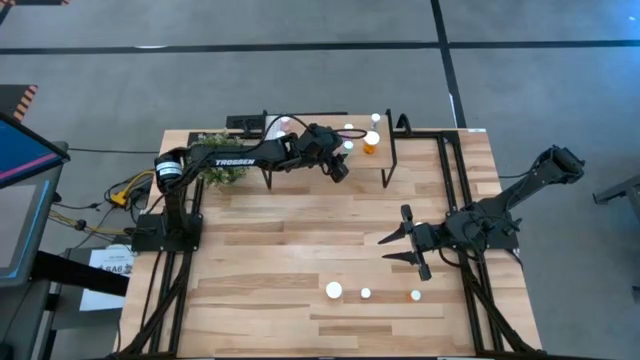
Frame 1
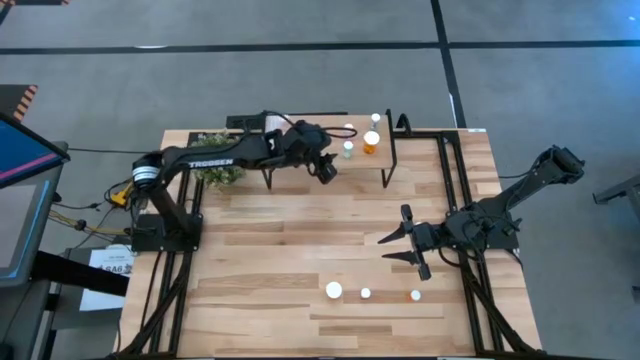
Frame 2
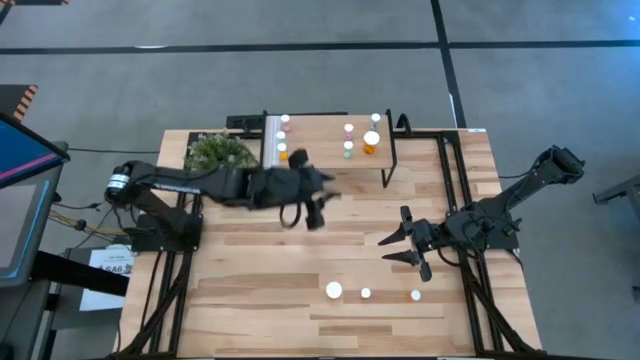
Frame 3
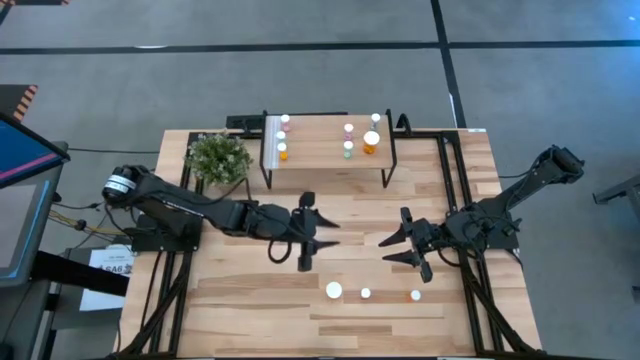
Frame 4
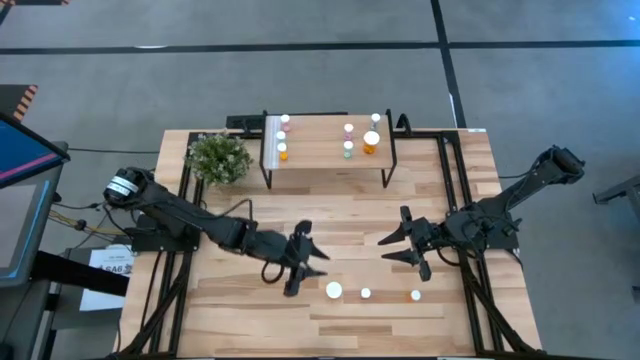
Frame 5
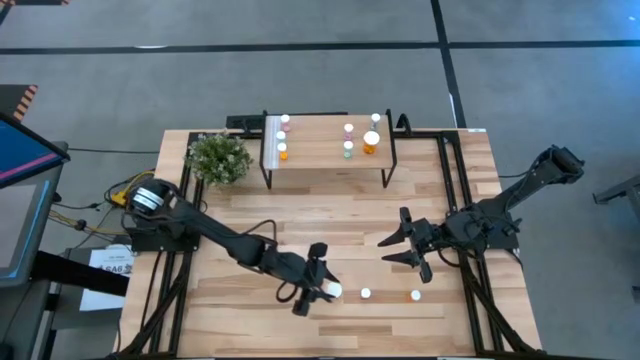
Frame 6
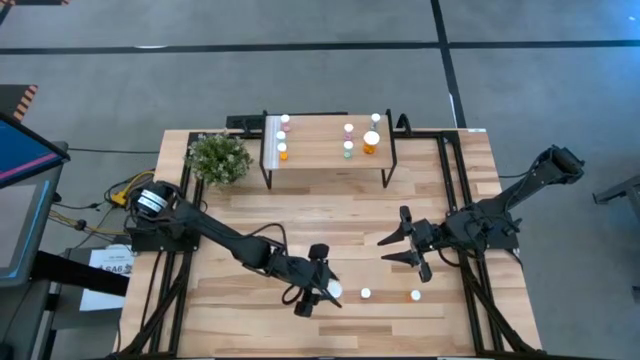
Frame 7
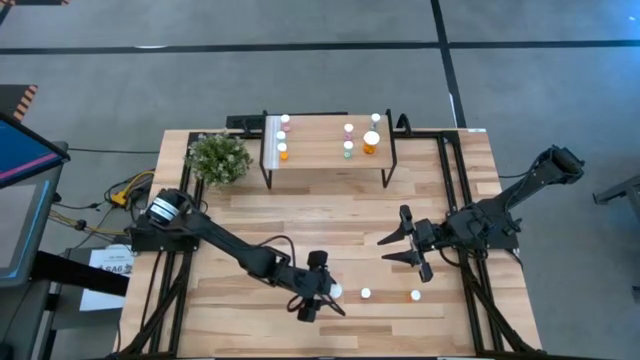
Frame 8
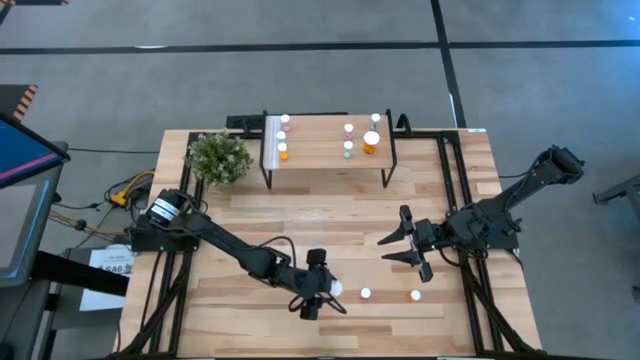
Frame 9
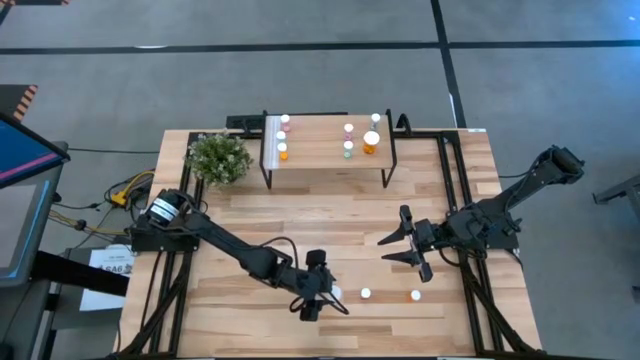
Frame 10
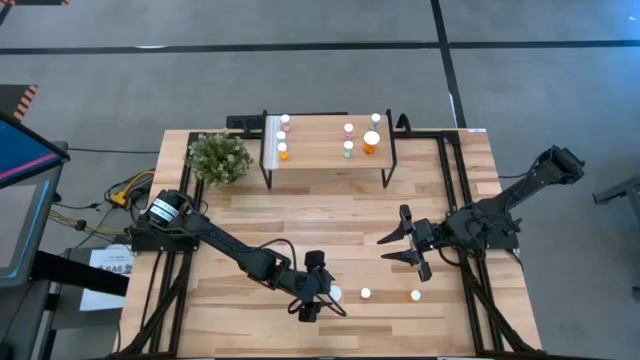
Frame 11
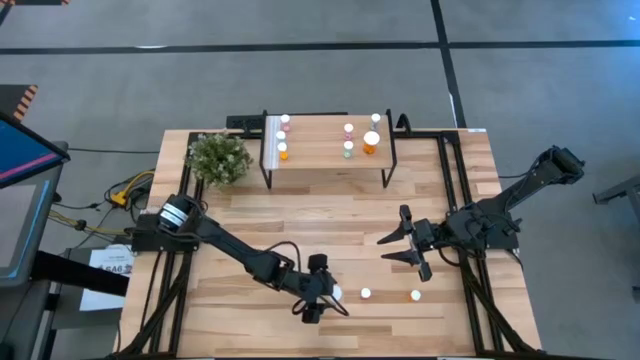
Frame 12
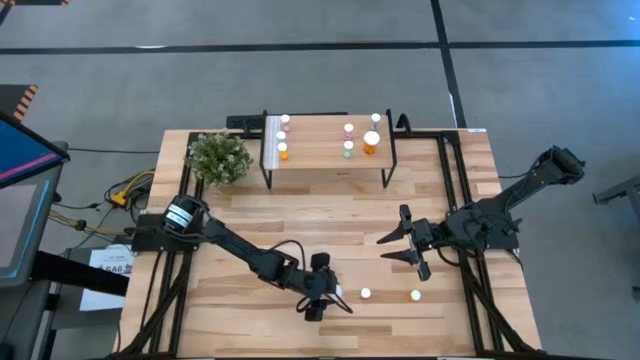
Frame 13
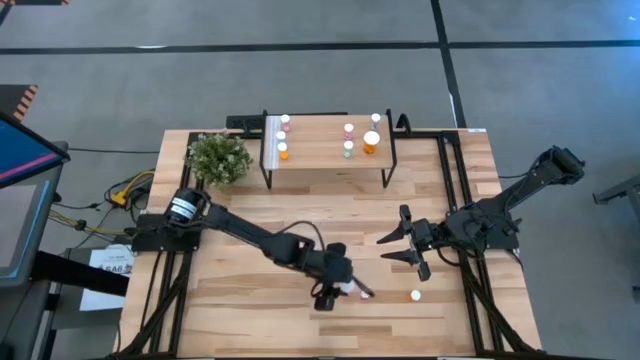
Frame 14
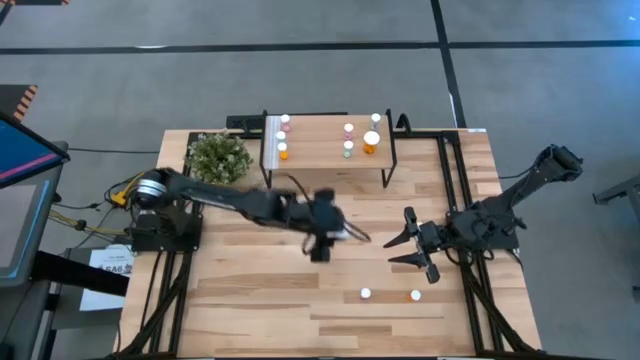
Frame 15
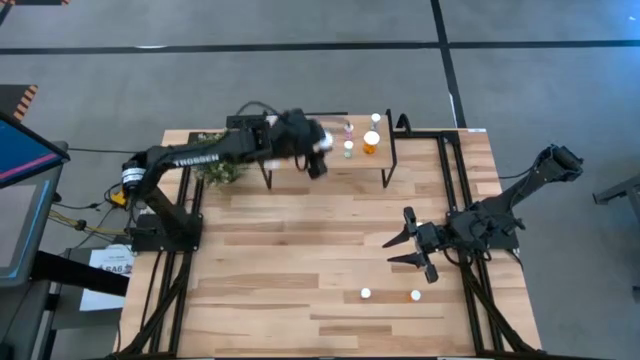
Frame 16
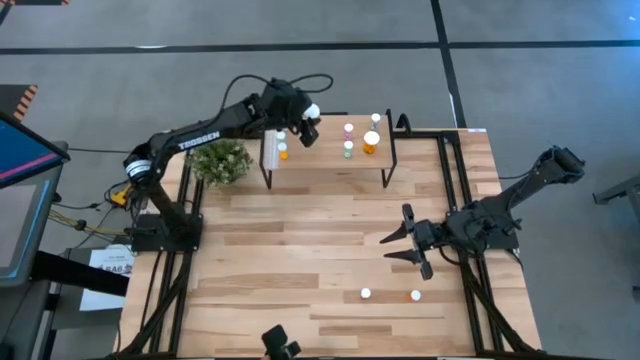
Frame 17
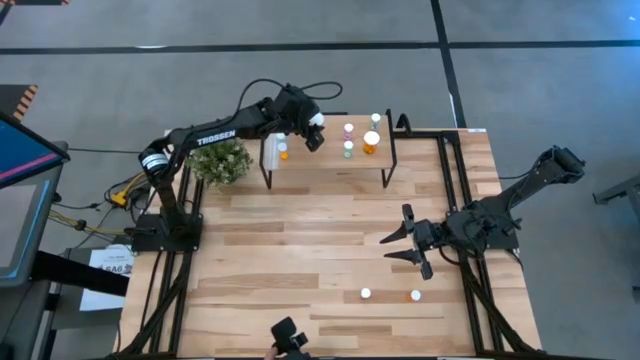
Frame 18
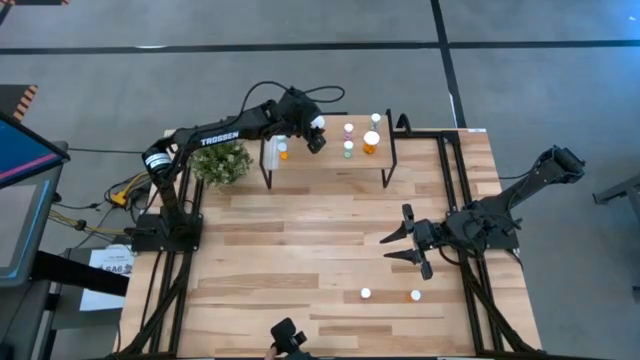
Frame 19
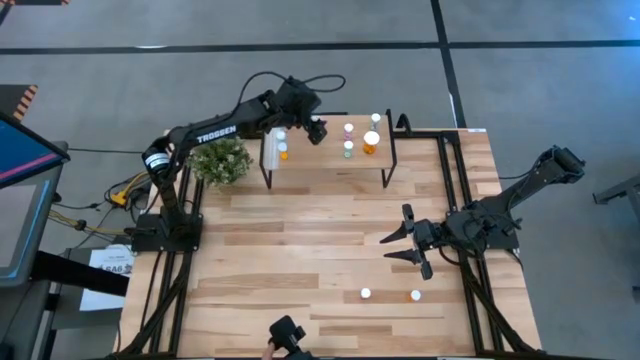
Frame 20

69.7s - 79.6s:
Task: Pick and place medicine bottles onto shelf by color
Put the big orange pill bottle on the shelf

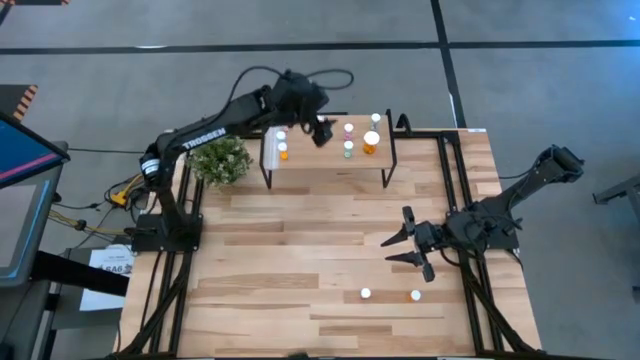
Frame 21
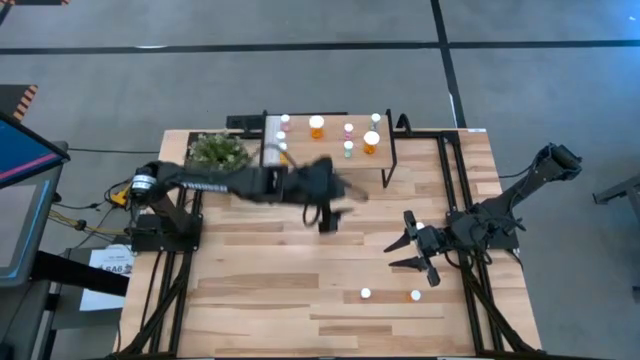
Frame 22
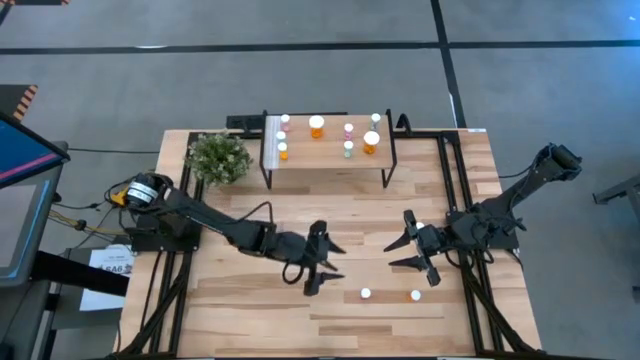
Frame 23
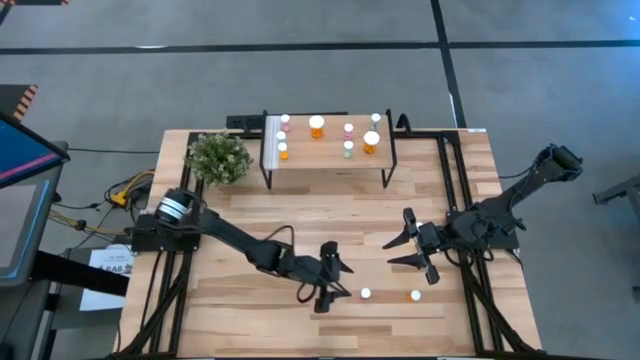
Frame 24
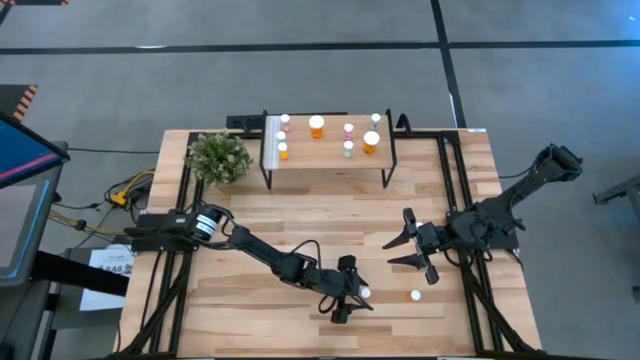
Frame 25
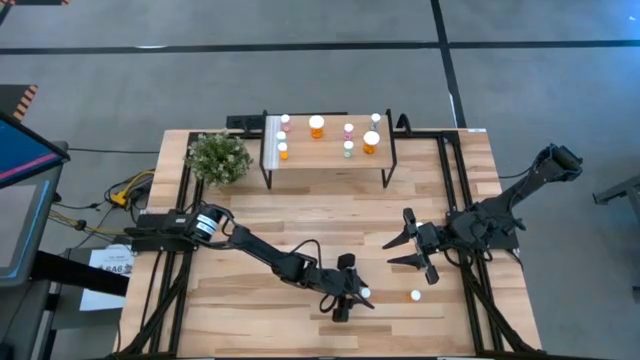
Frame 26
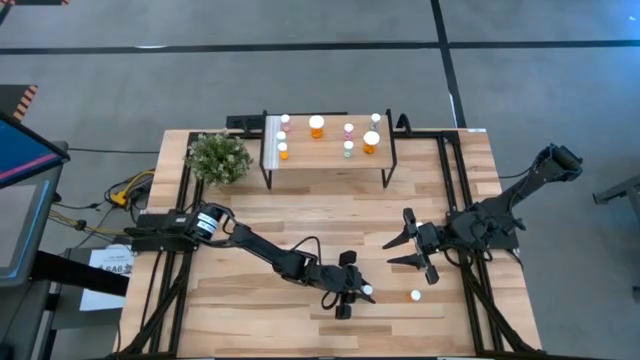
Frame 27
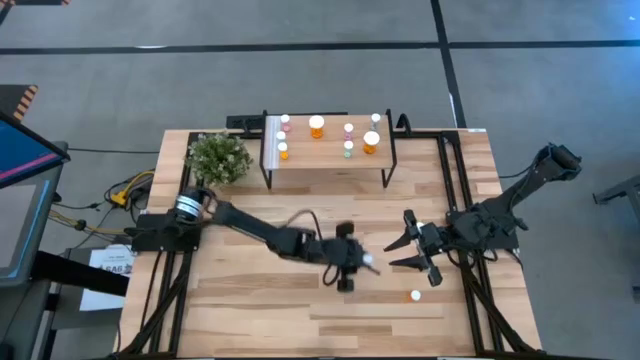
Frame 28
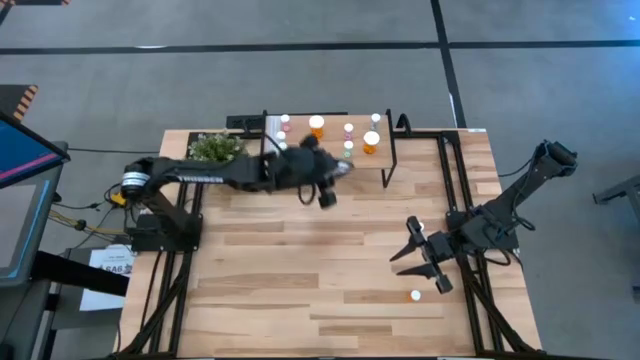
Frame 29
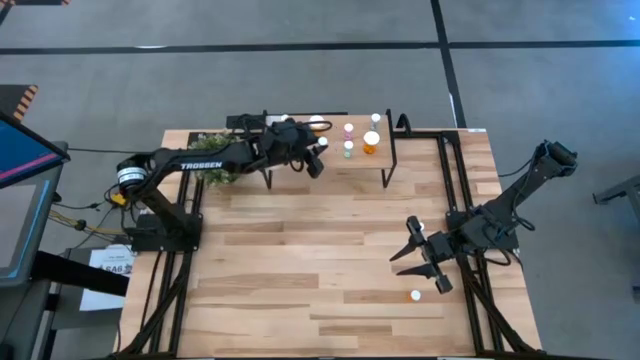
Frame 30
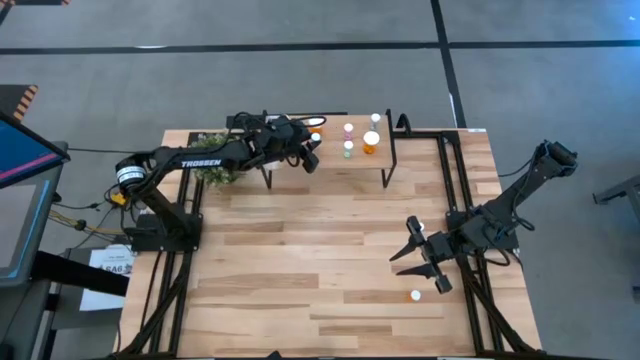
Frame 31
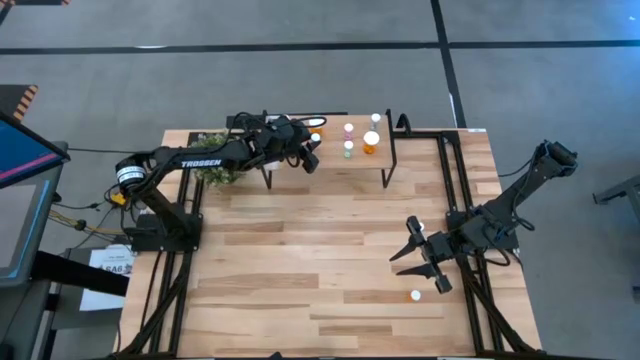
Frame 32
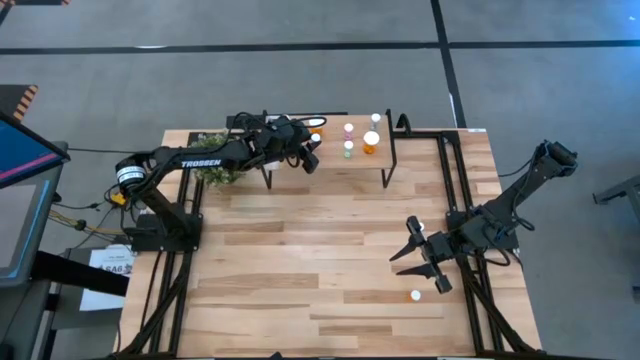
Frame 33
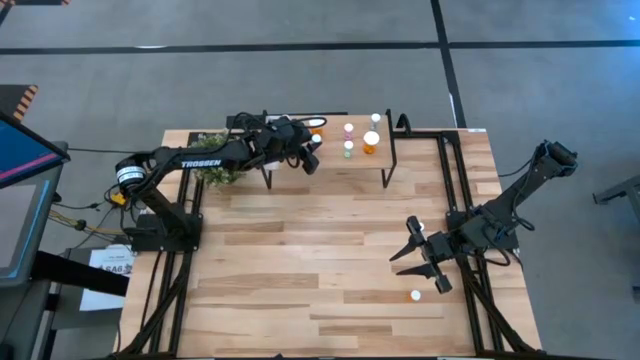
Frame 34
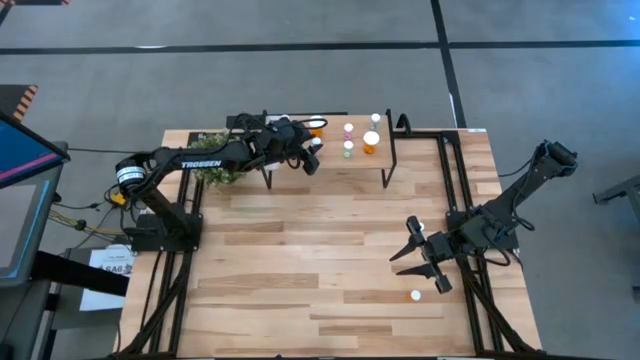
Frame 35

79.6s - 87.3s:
Put the pink pill bottle on the shelf

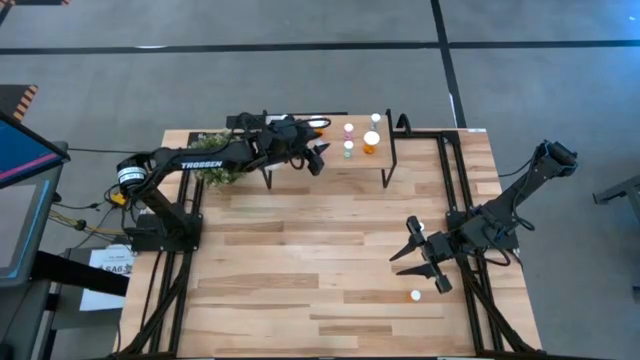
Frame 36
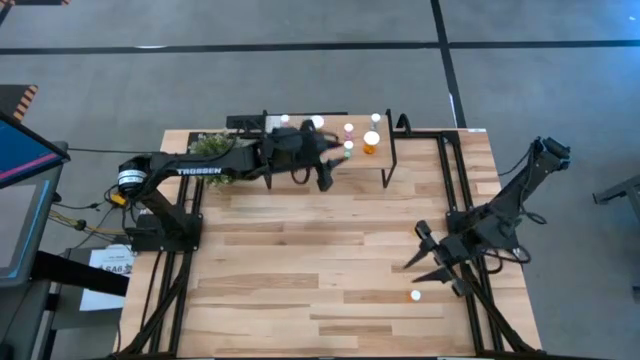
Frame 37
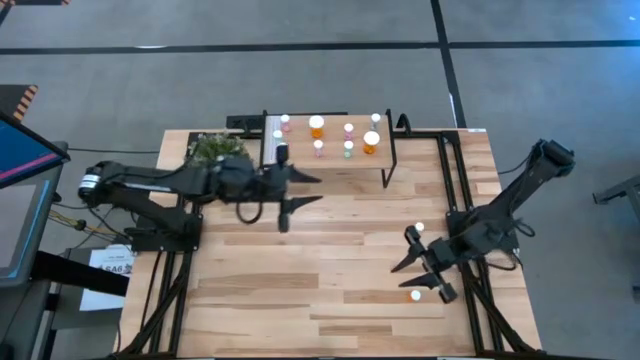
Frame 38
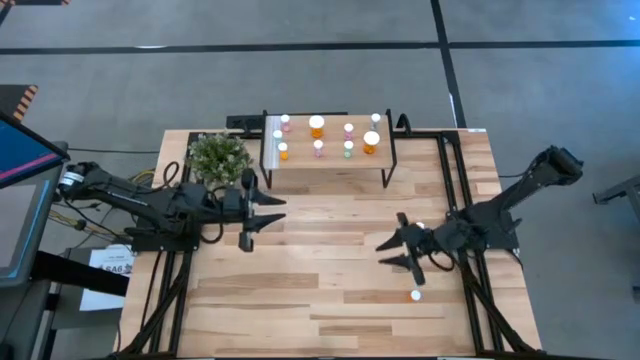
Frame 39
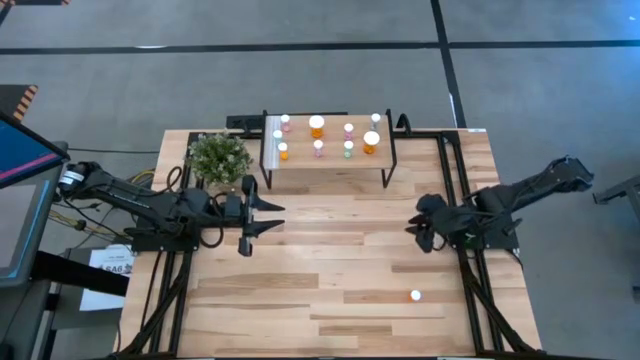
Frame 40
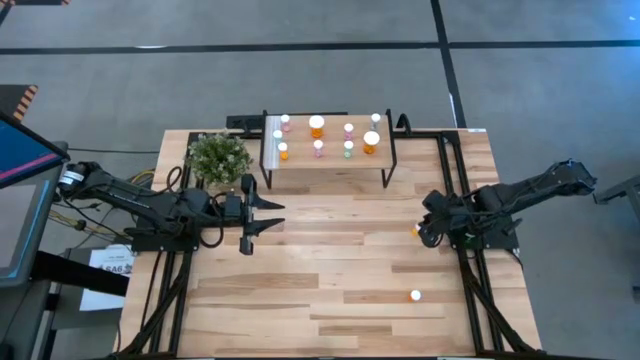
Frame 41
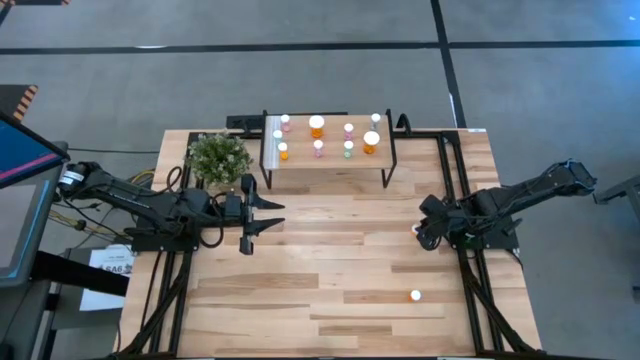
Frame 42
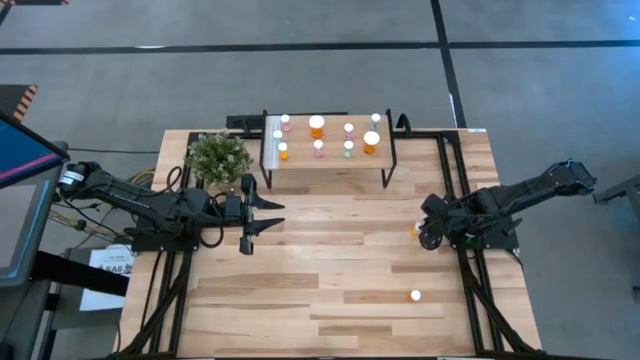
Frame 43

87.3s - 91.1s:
Put the top small orange pill bottle on the shelf
